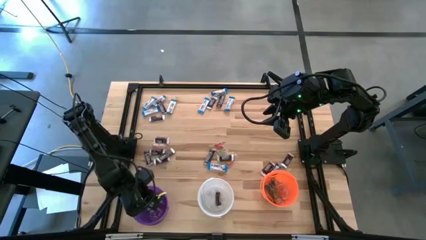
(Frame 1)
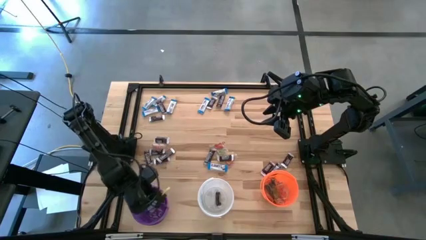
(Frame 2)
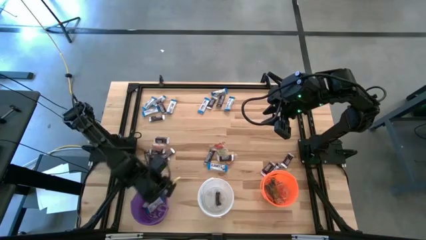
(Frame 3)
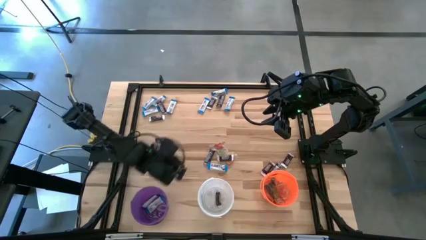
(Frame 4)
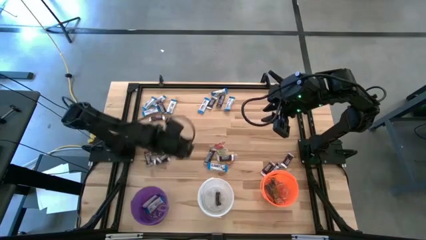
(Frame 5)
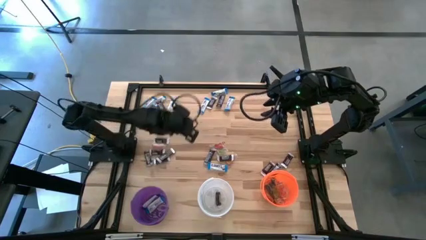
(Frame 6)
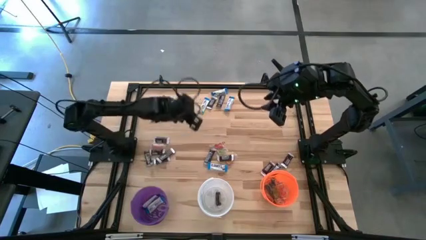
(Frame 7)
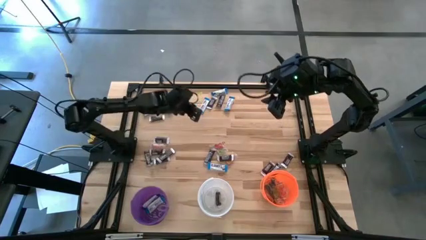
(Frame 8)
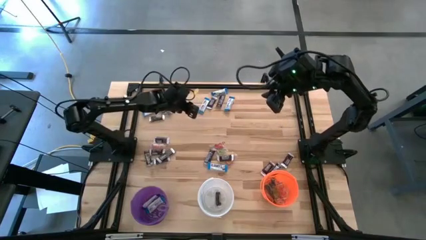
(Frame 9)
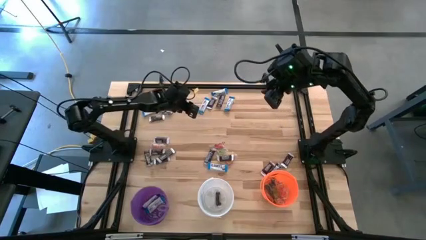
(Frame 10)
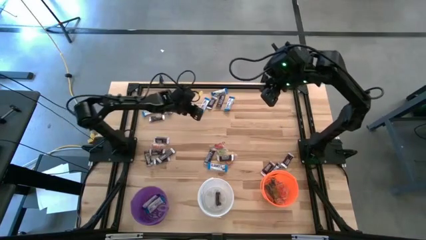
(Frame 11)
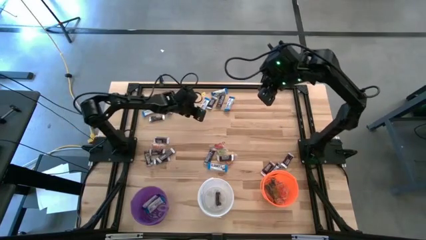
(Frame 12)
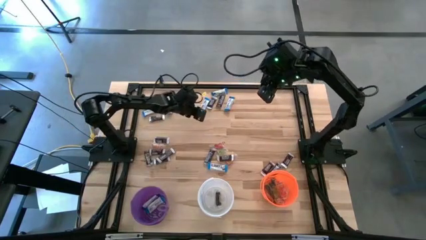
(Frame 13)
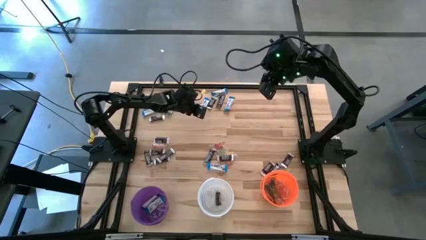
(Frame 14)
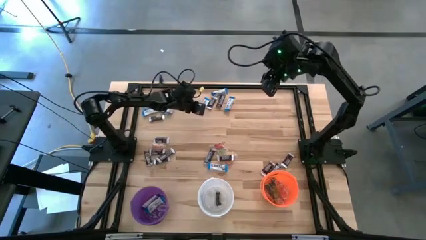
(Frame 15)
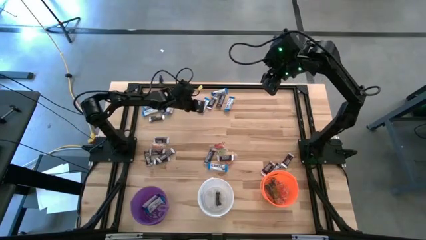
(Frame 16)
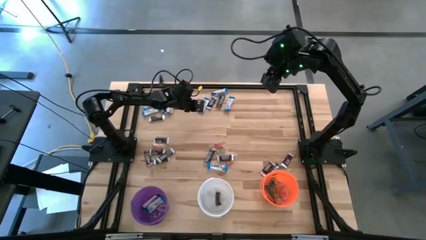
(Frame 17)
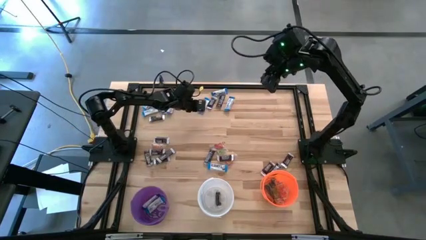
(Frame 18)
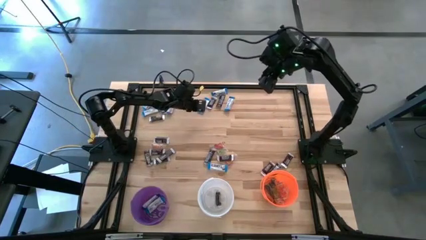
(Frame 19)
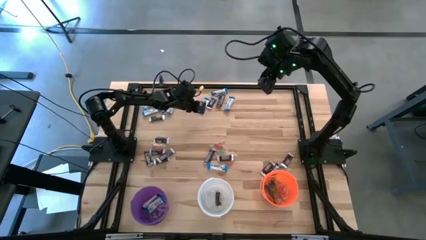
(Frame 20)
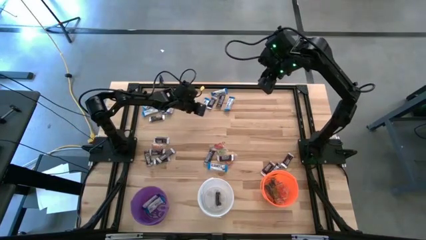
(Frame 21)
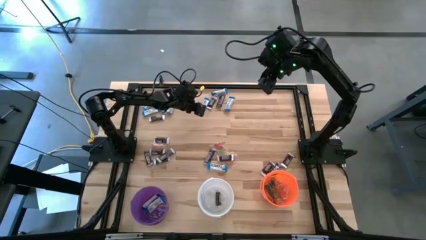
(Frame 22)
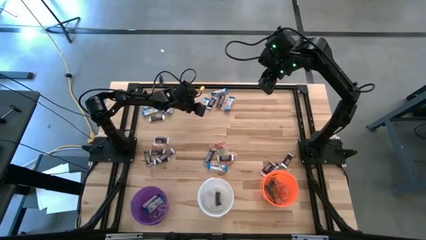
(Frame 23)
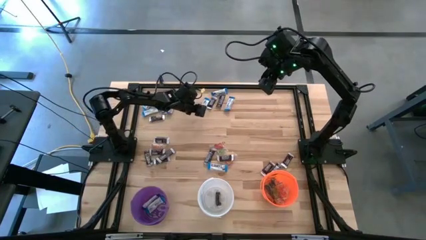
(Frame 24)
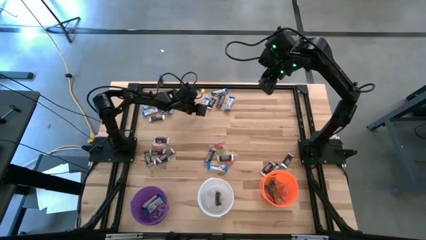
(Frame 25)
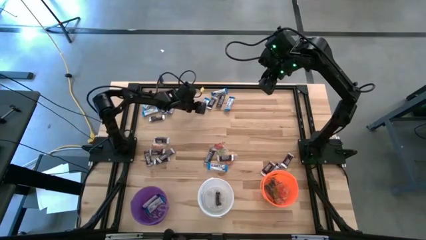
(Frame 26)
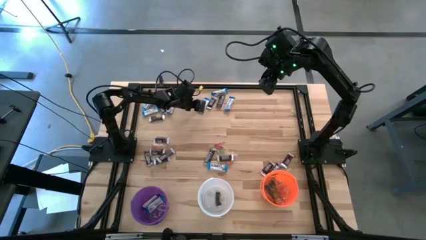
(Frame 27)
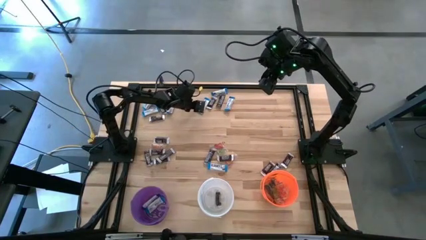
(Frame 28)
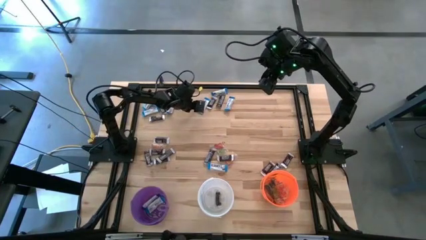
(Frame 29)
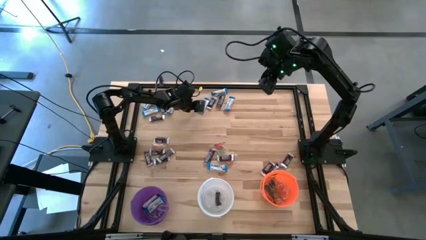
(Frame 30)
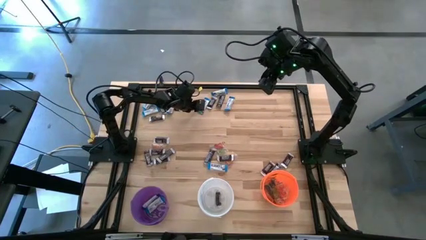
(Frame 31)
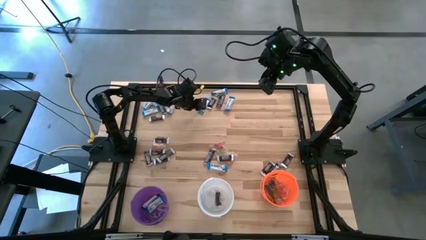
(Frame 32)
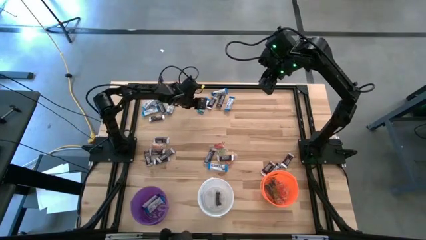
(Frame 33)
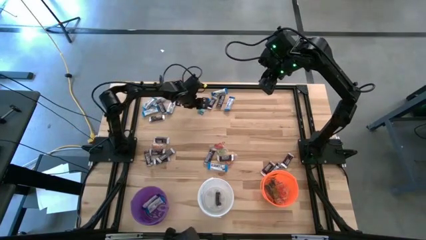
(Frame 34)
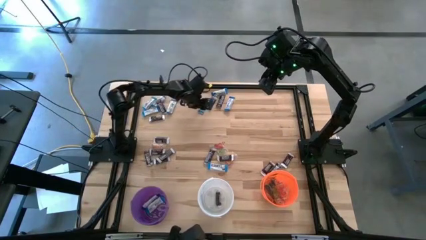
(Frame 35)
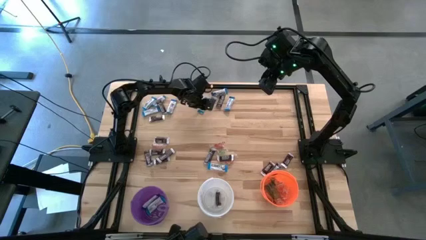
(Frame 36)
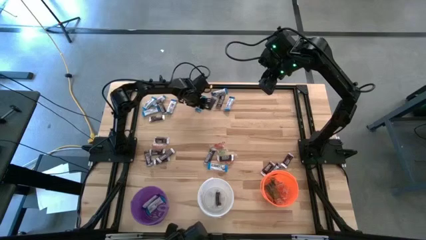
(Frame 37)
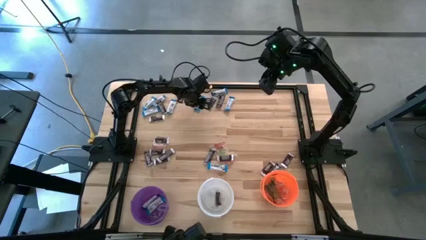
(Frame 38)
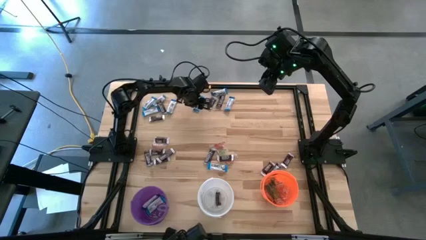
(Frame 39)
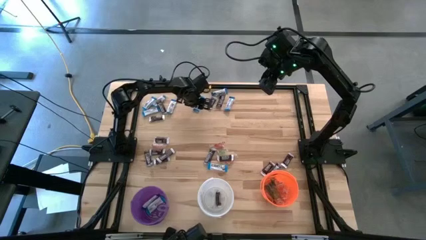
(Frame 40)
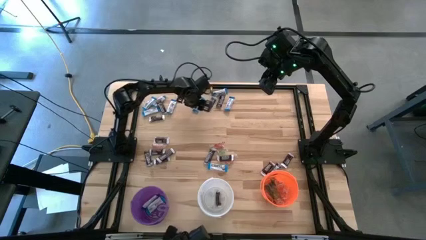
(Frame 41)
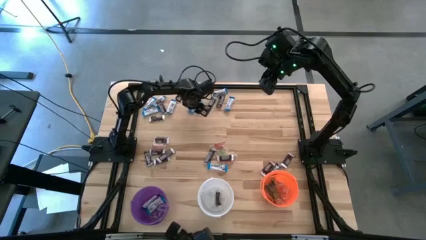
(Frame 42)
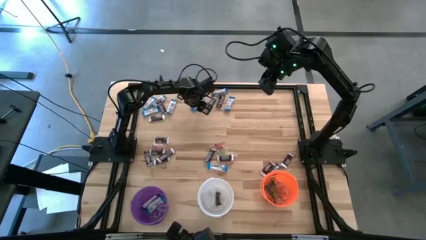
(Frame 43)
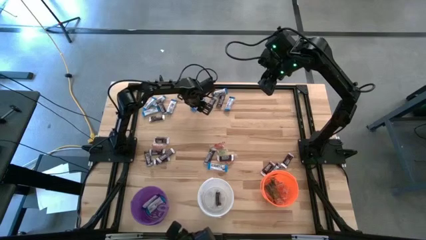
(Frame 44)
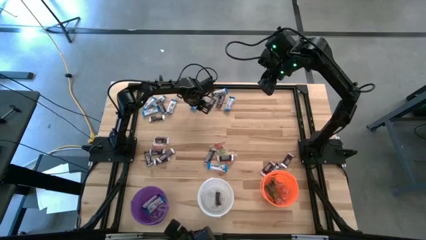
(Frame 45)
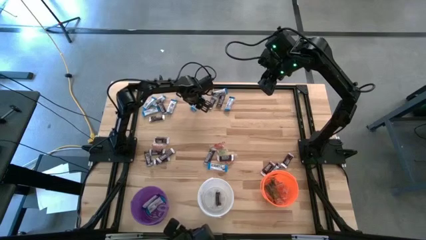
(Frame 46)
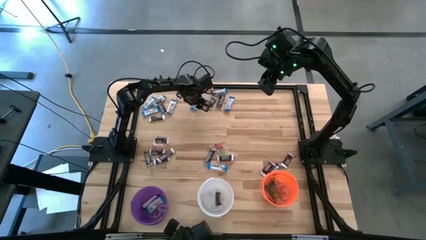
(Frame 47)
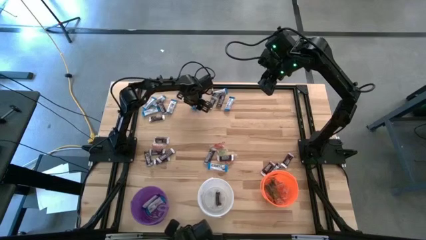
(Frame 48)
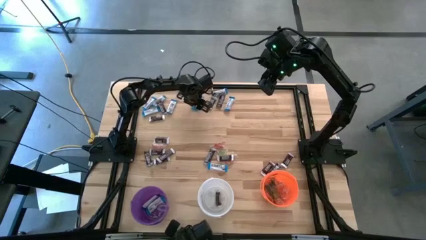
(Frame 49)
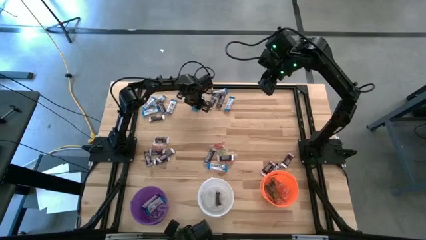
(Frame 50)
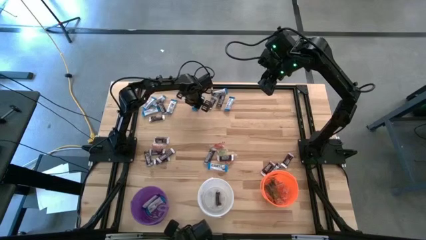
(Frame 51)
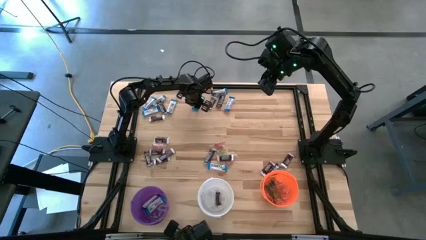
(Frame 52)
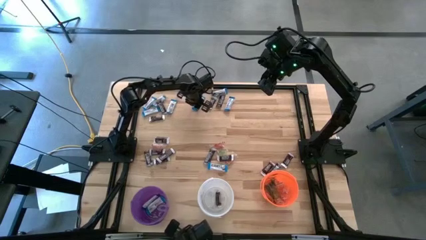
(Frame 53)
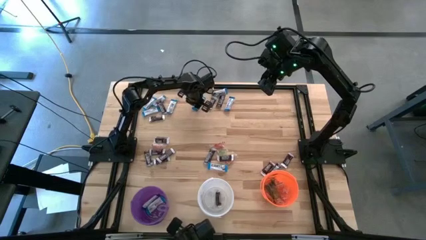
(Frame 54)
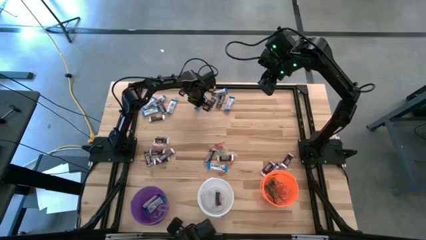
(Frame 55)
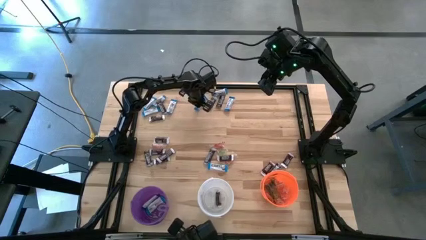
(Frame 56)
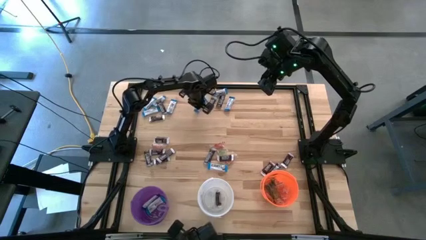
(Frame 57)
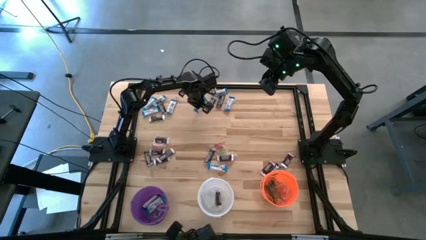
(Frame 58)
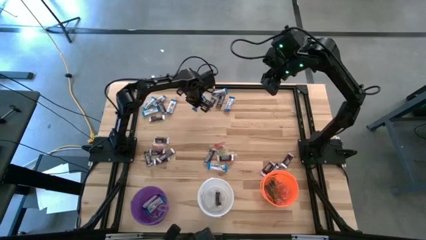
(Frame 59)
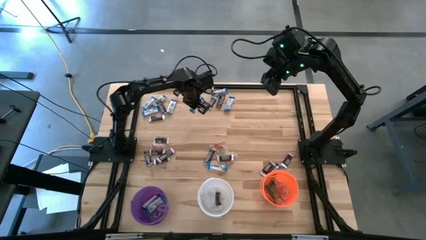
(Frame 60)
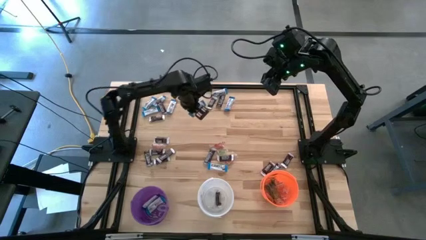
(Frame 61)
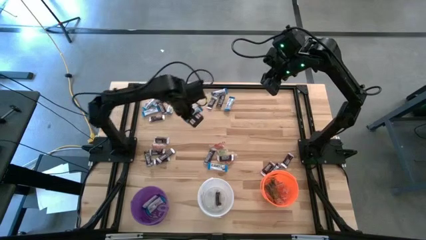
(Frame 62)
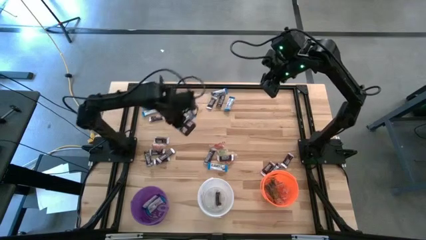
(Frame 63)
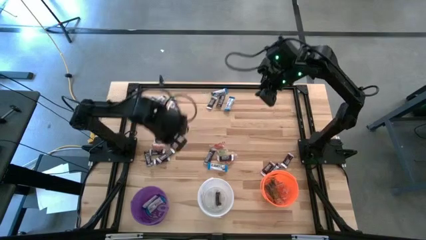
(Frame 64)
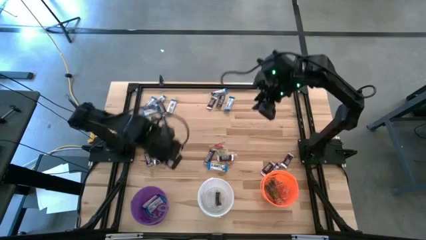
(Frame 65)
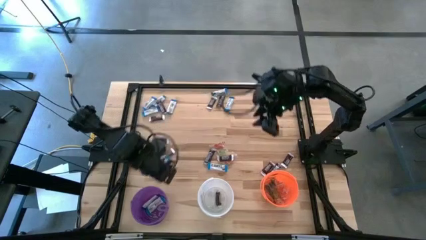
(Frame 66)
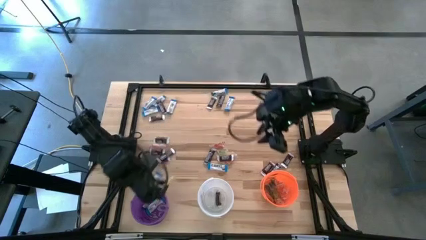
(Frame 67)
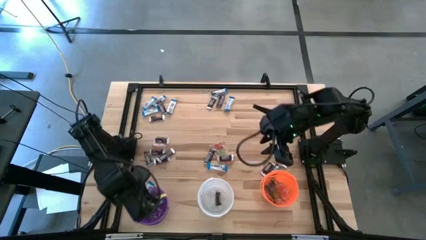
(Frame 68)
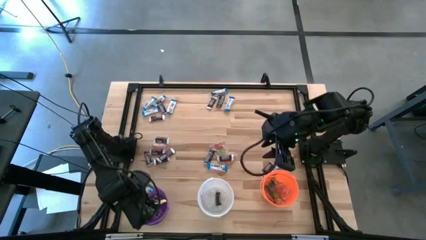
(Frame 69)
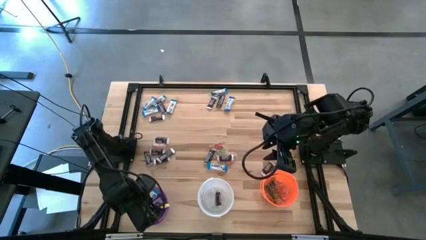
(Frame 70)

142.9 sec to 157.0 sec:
Task: Sort candy
Put the white chocolate into the violet bucket

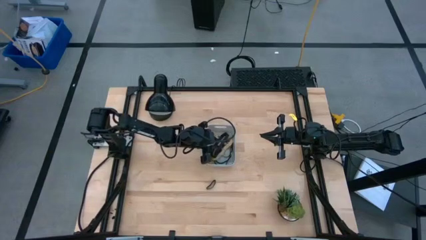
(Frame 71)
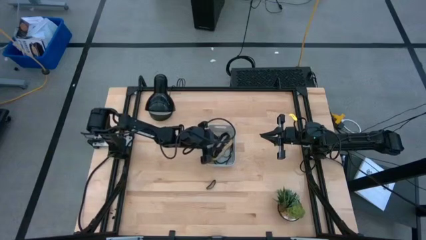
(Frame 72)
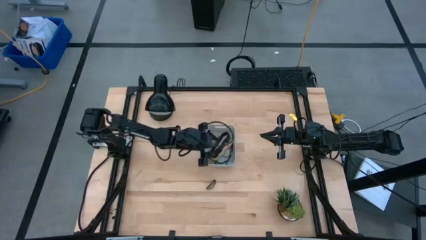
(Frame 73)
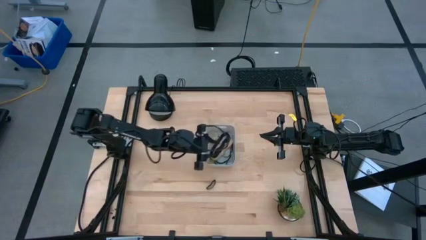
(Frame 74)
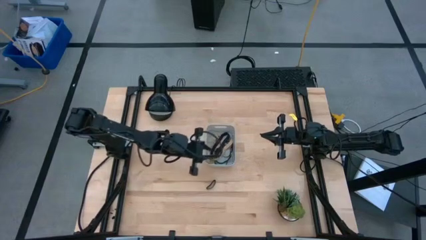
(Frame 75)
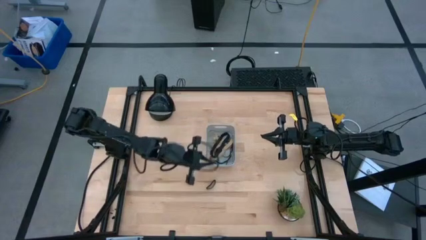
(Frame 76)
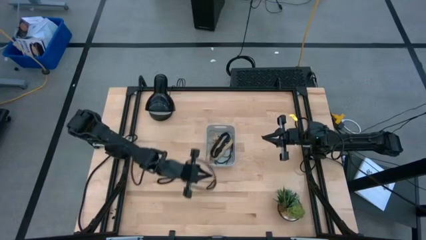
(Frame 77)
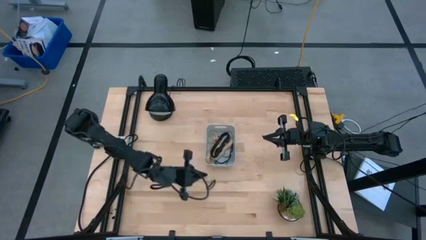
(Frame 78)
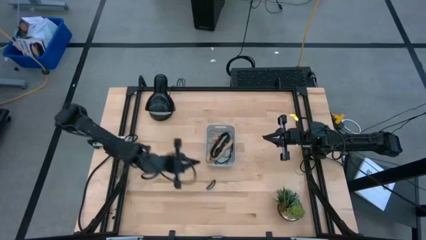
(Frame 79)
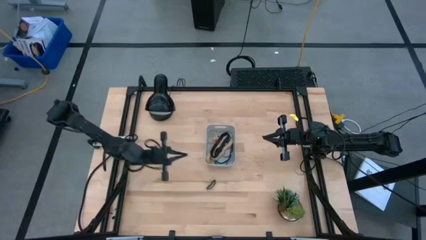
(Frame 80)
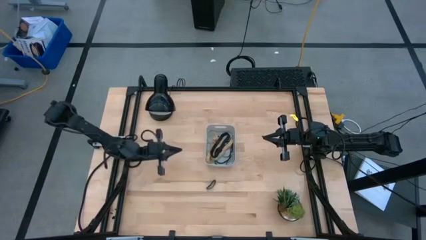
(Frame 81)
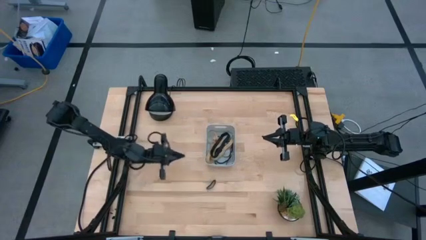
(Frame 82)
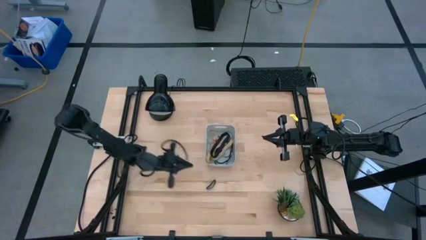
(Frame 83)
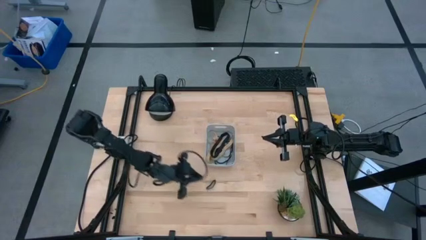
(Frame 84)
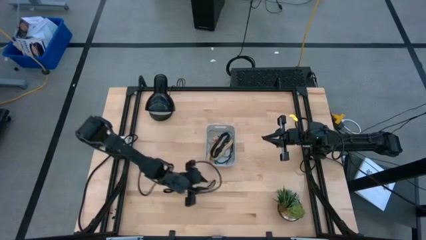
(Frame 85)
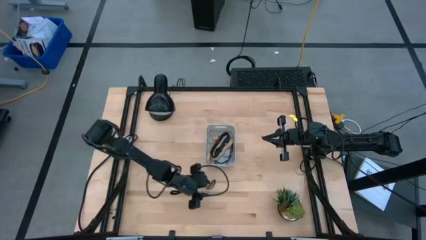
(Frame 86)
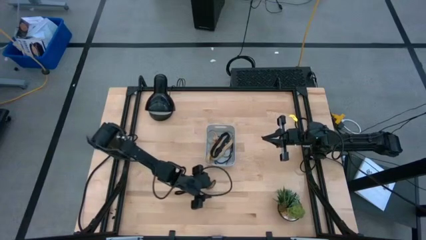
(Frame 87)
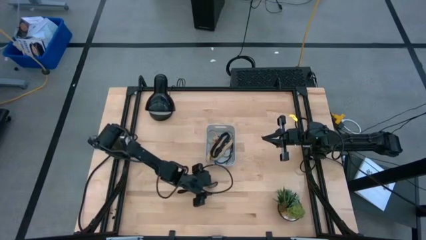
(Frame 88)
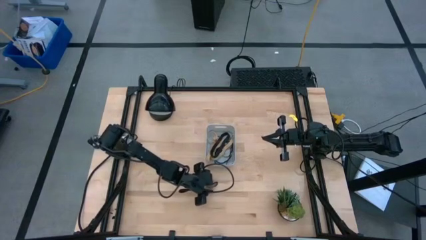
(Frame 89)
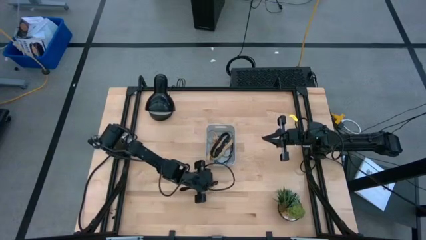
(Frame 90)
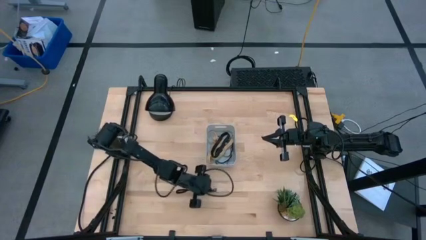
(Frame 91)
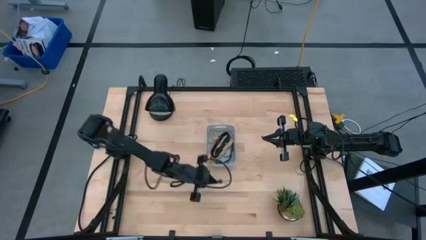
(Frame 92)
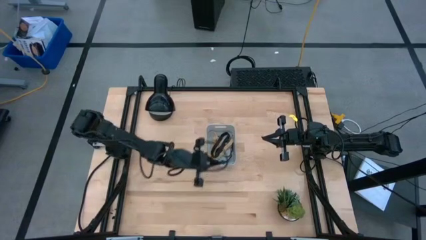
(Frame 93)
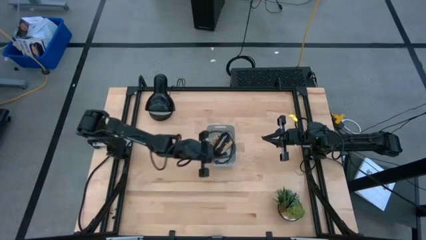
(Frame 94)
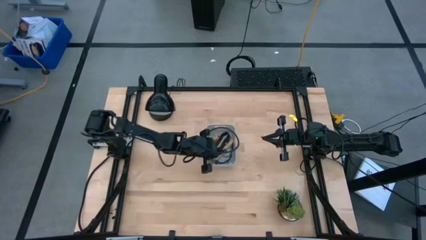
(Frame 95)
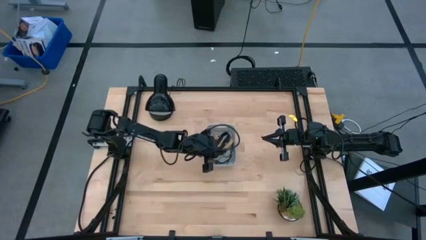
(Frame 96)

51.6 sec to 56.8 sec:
Task: Pick and place rubber bands into bin
Put the black rubber band into the gray bin
